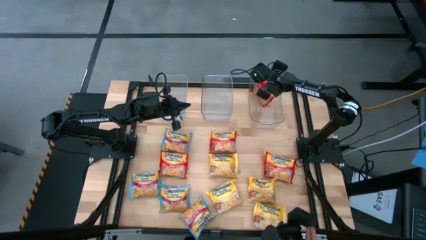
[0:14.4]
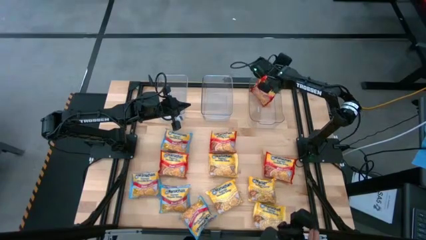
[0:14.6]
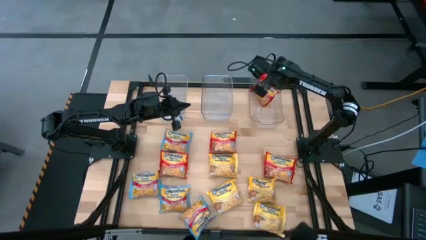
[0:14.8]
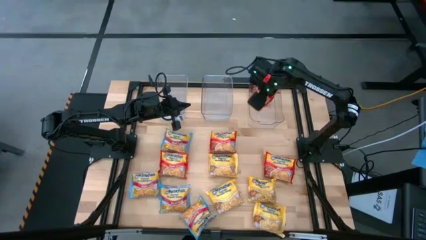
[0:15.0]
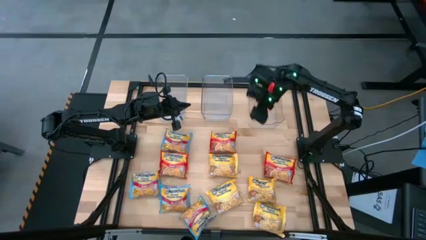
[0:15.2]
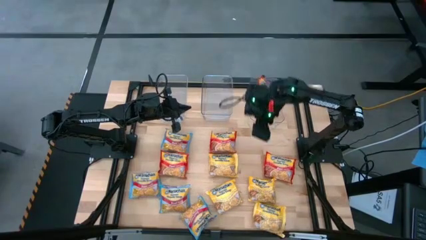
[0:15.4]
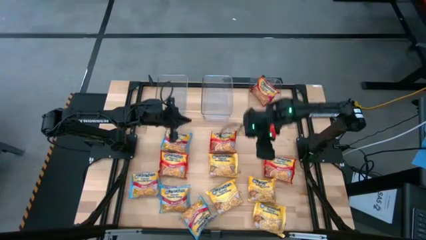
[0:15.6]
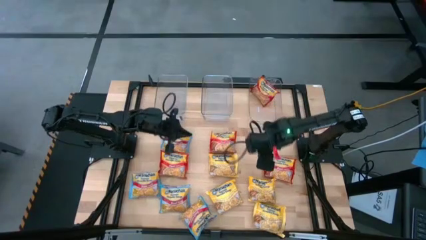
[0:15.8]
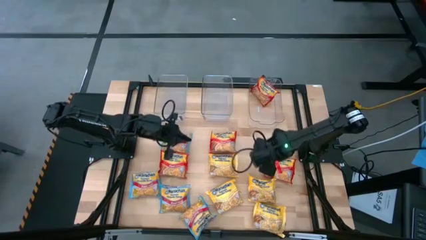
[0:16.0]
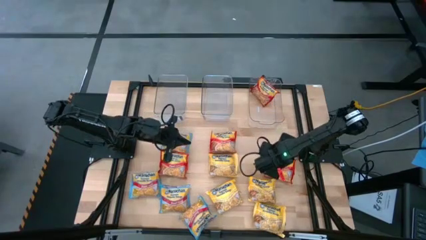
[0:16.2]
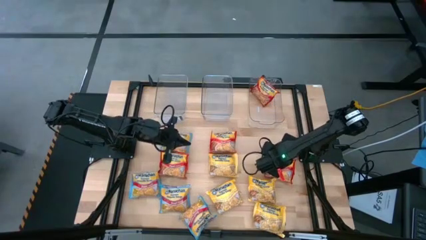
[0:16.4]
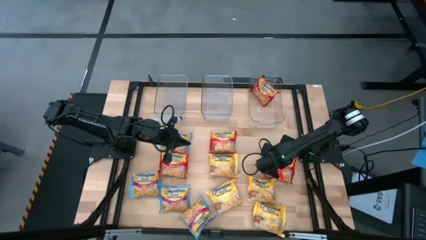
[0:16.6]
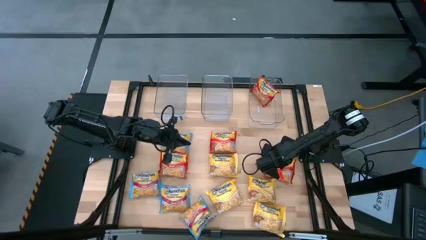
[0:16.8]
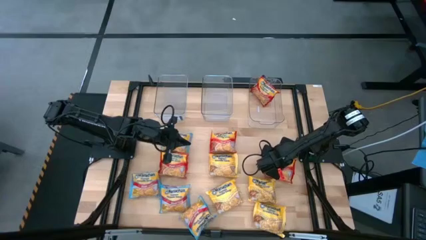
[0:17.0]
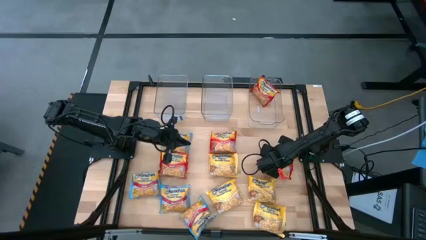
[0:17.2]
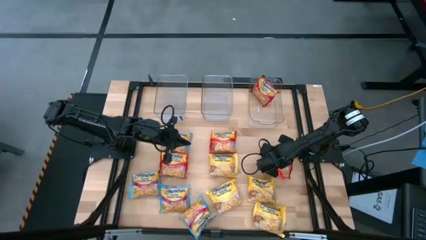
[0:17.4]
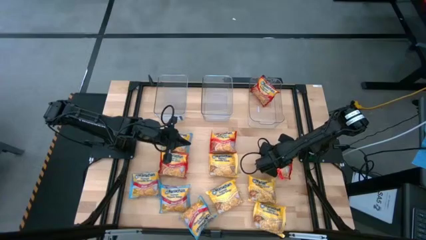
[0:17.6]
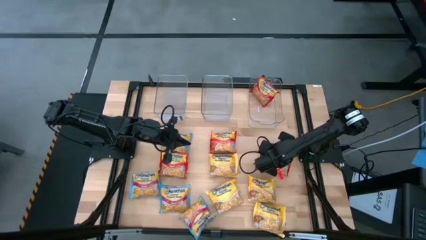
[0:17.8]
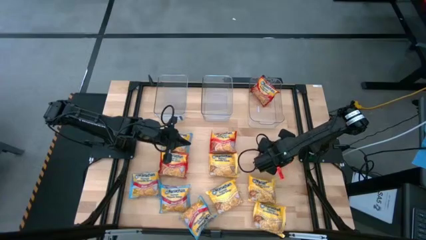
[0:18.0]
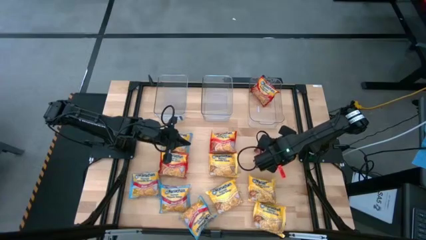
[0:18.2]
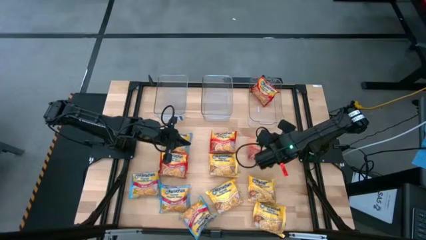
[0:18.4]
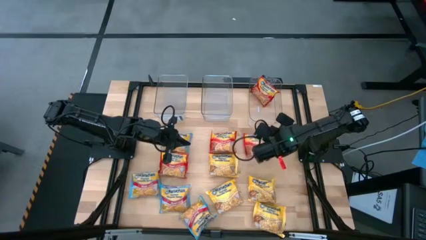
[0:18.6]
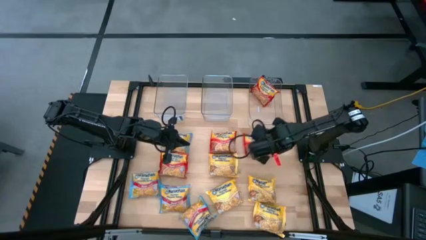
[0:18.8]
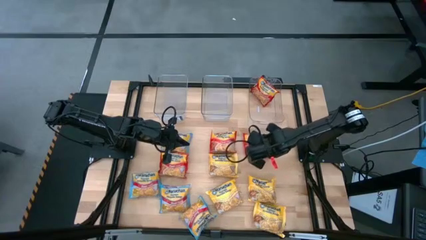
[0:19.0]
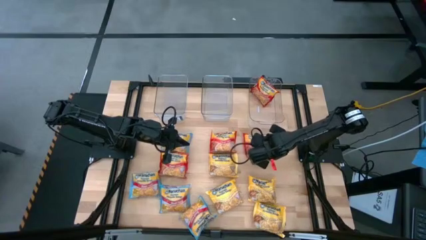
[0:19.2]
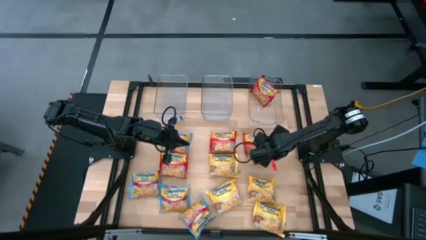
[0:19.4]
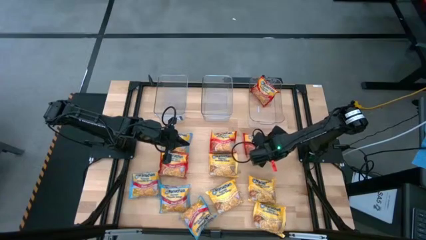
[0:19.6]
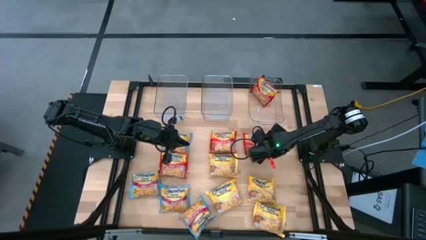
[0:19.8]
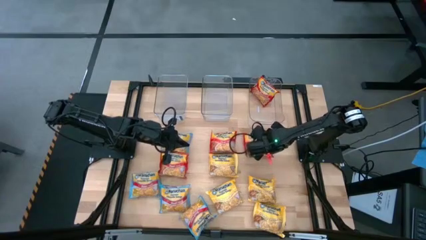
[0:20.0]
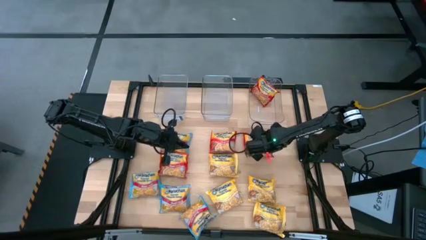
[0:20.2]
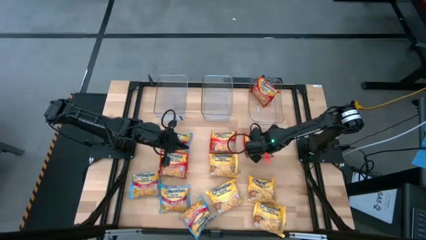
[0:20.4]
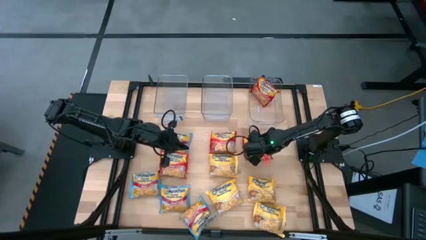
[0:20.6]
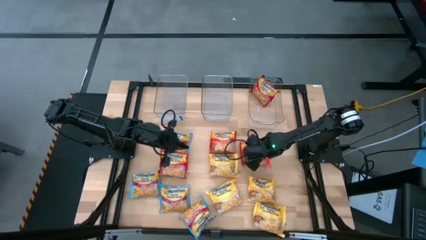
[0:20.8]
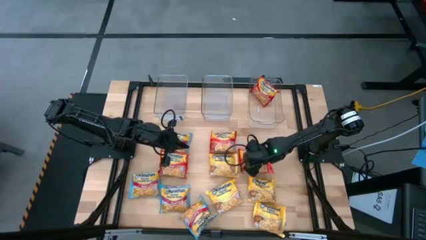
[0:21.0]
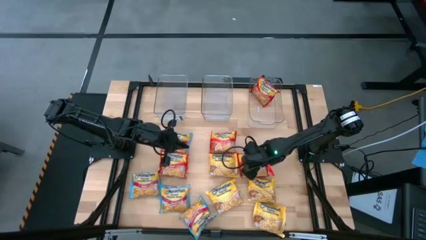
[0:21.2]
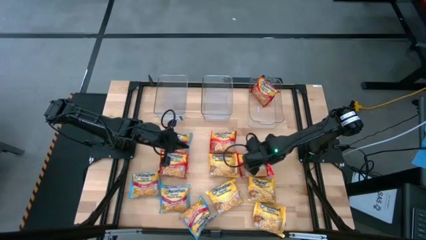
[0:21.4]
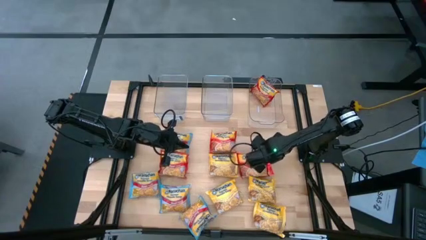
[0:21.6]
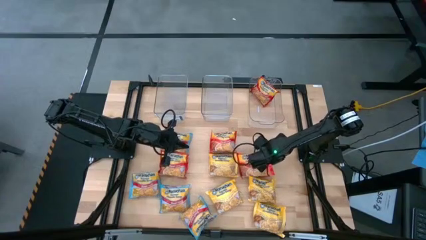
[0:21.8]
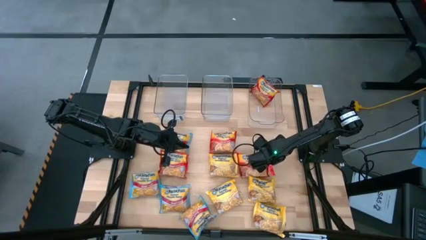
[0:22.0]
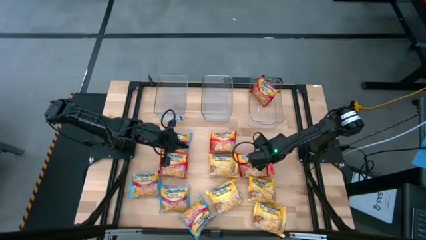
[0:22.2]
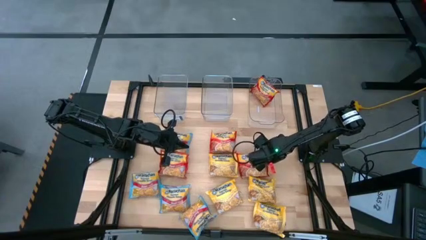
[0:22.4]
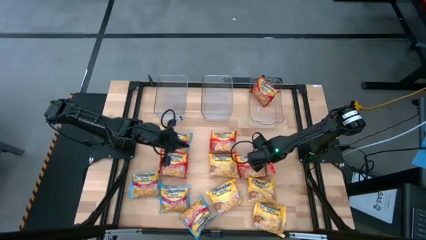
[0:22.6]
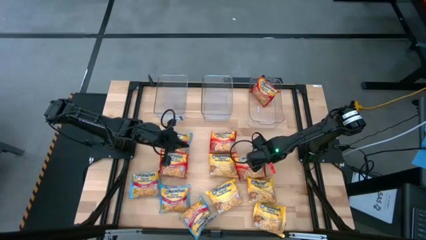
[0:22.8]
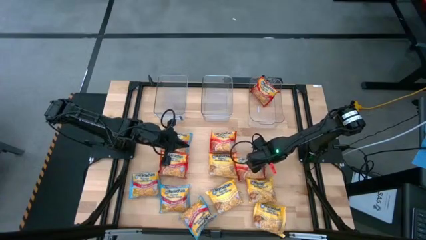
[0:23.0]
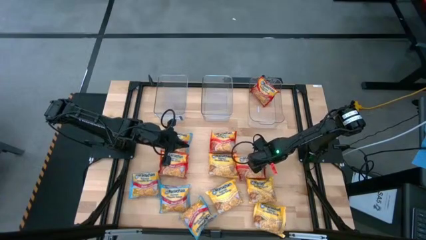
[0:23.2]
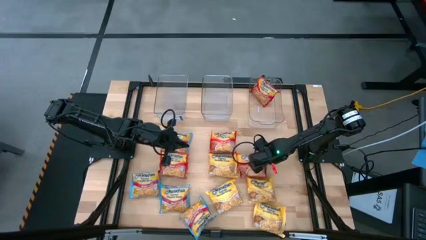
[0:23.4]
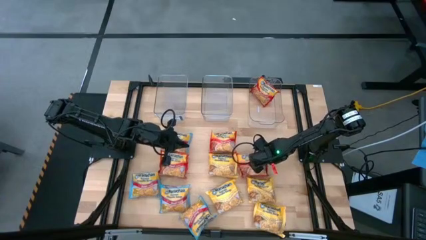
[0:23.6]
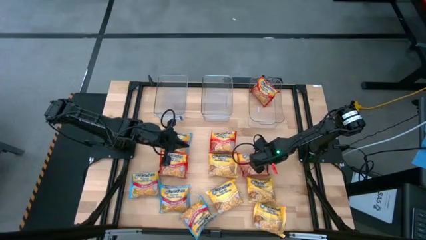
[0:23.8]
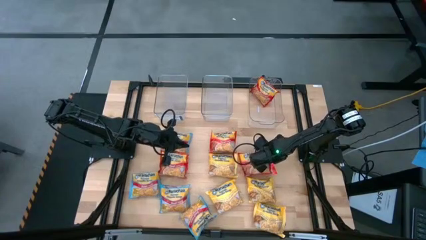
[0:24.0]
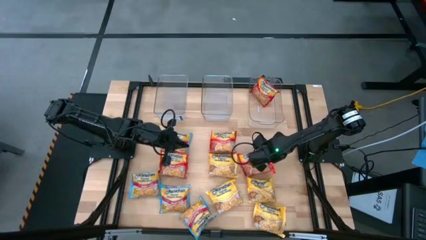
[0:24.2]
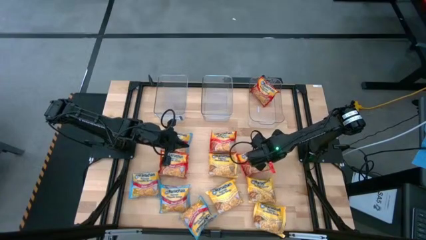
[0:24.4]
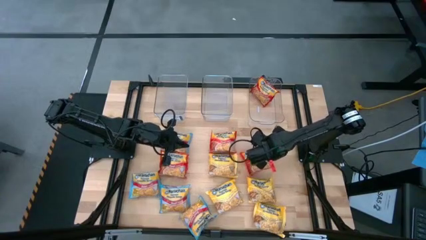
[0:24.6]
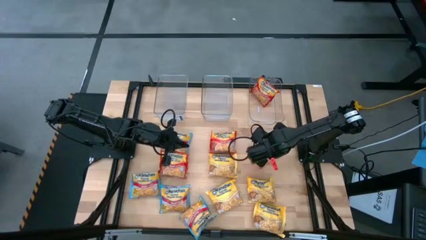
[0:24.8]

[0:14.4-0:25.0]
Task: Sort Maruchan noodles
Put the red noodle pack into the right transparent bin

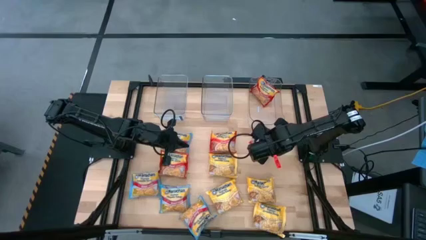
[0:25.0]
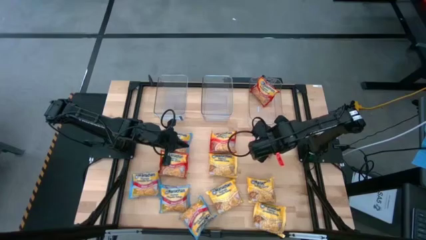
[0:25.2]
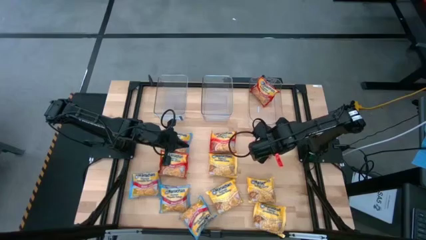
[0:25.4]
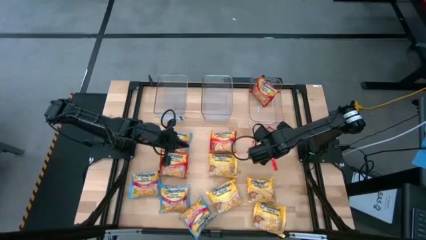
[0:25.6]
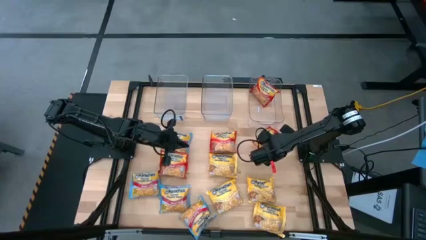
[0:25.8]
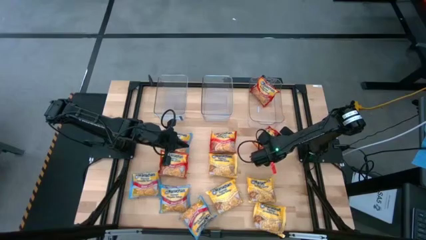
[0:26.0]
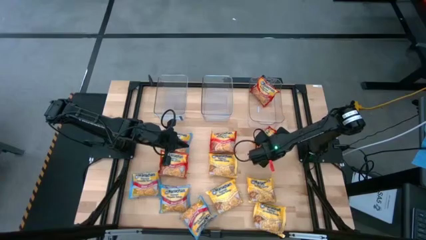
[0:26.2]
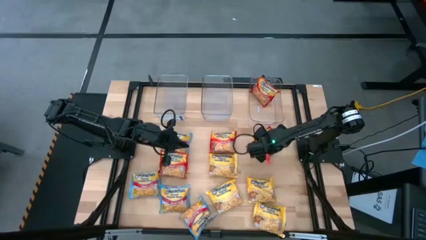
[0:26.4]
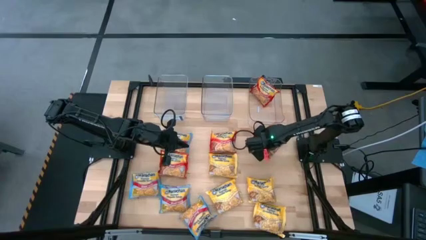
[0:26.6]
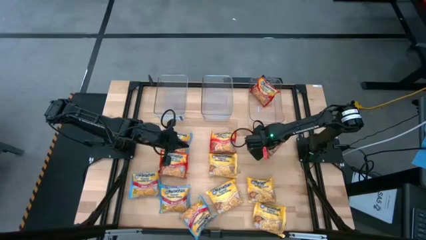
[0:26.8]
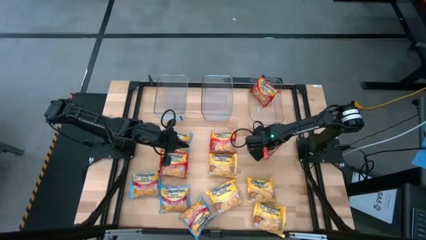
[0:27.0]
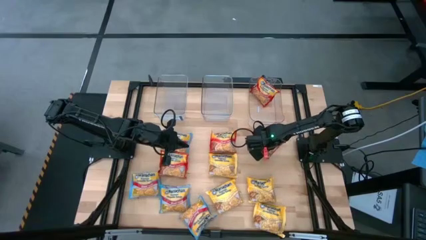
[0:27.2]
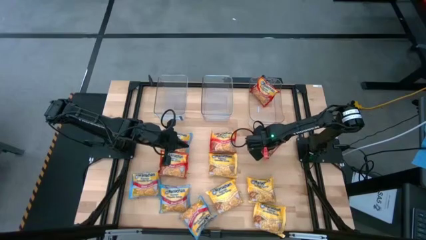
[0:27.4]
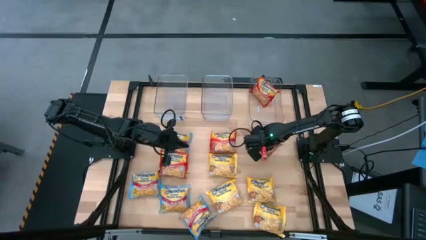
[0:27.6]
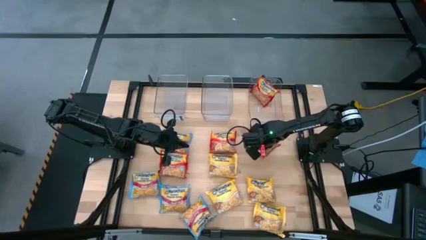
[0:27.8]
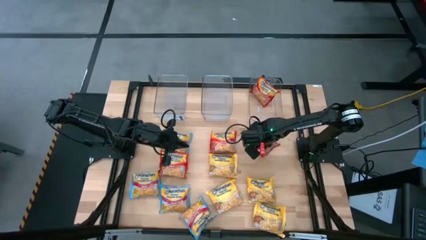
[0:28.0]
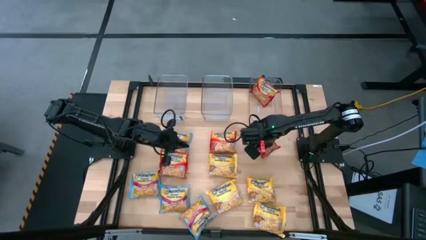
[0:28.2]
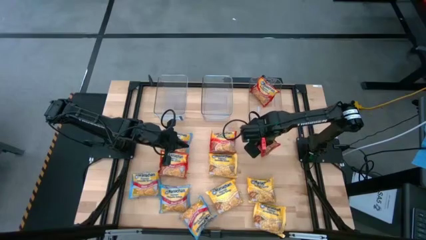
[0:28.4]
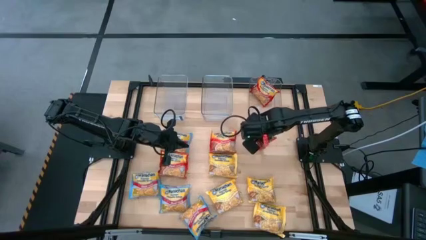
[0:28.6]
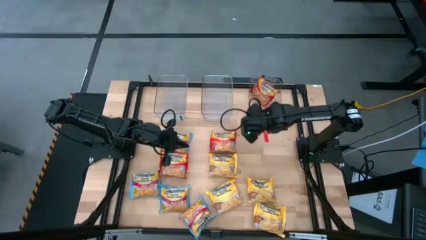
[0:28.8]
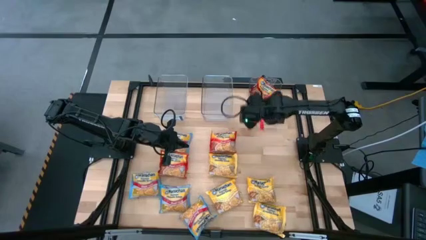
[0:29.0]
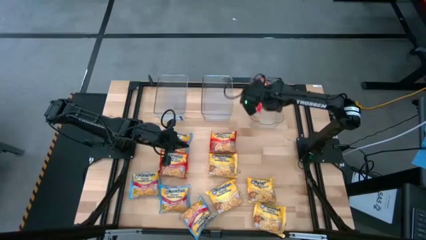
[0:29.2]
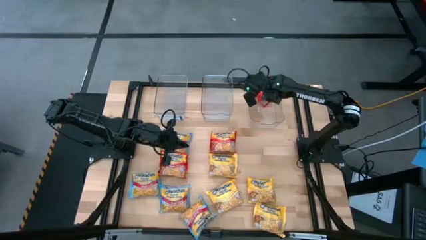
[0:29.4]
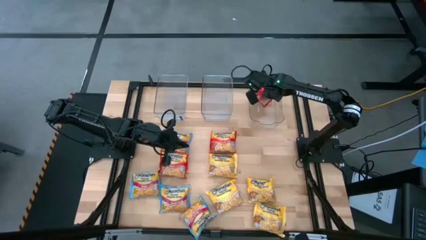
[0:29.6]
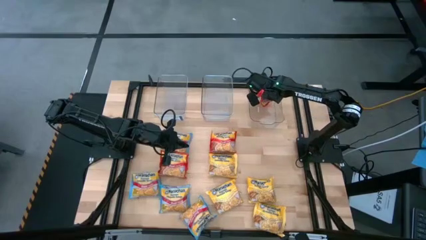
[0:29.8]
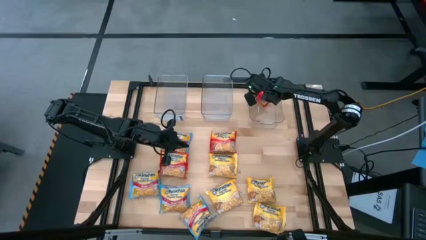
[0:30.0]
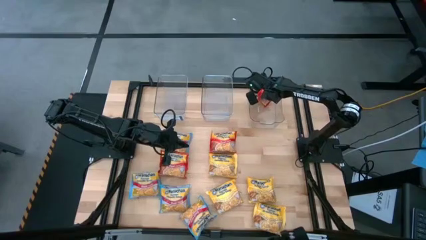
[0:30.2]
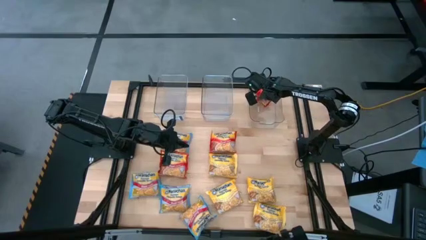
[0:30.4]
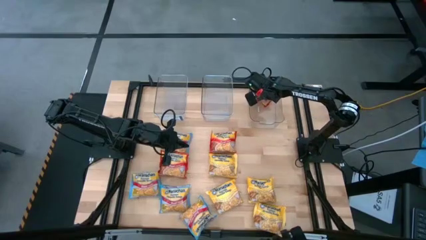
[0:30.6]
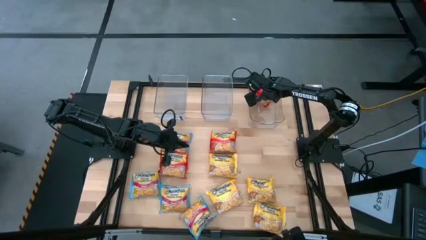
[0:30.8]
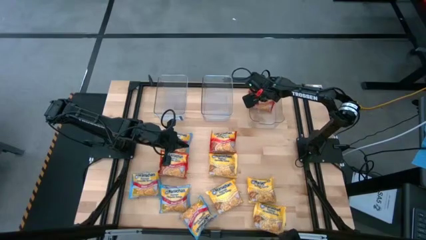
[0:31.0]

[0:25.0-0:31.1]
Put the red noodle pack into the right transparent bin
